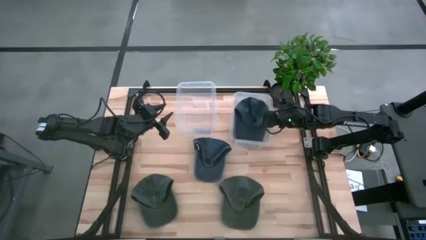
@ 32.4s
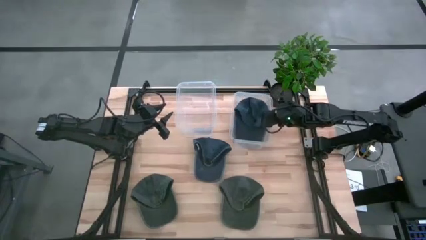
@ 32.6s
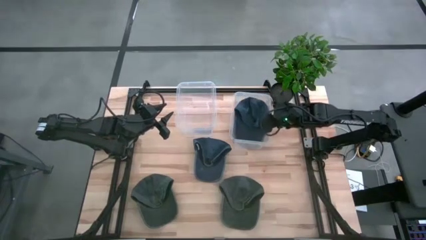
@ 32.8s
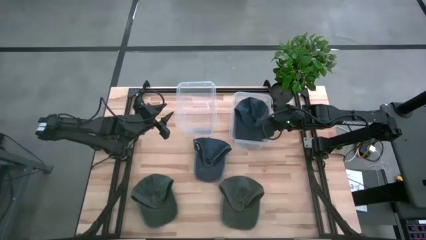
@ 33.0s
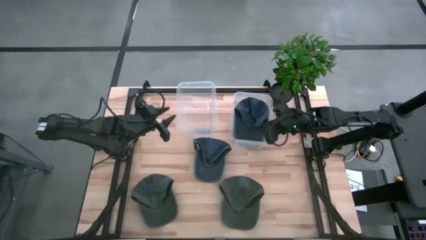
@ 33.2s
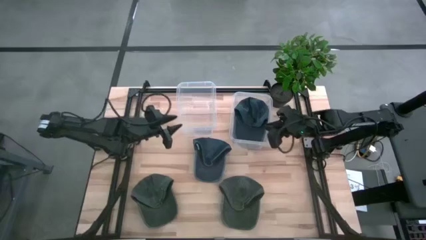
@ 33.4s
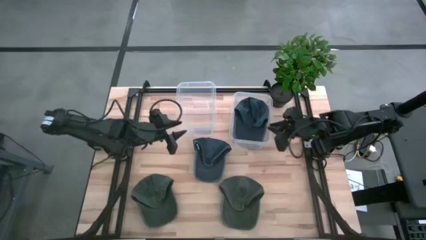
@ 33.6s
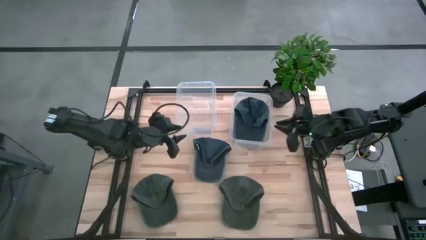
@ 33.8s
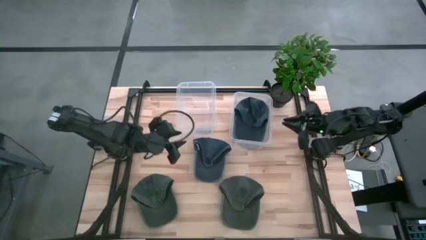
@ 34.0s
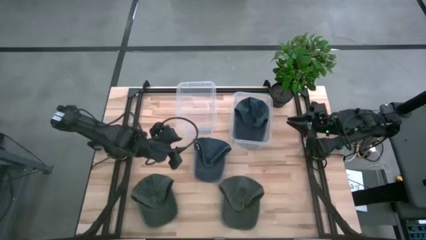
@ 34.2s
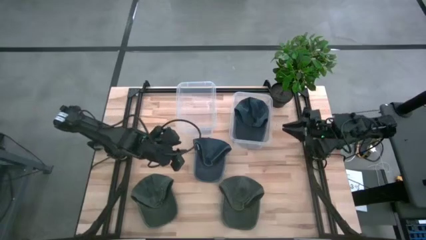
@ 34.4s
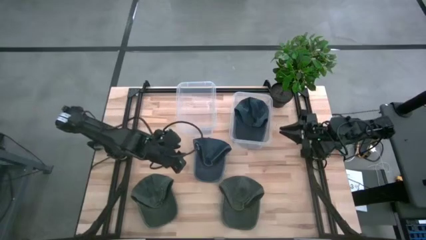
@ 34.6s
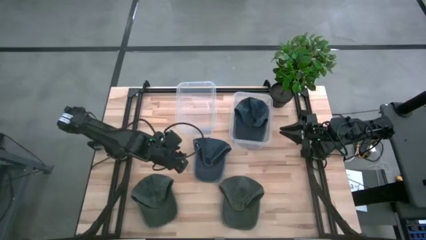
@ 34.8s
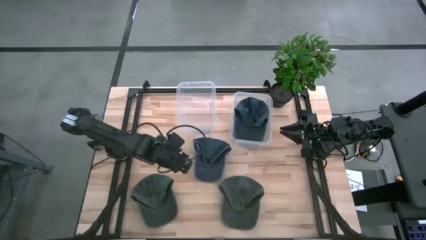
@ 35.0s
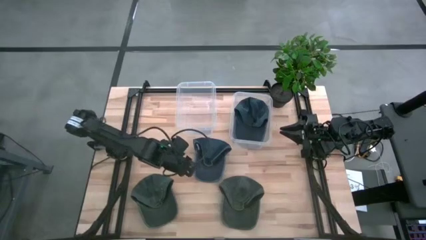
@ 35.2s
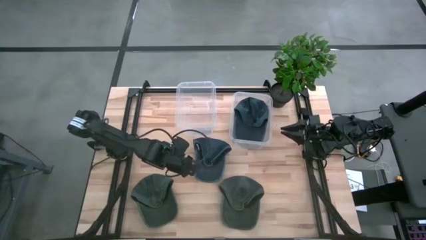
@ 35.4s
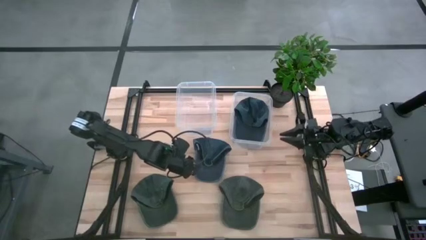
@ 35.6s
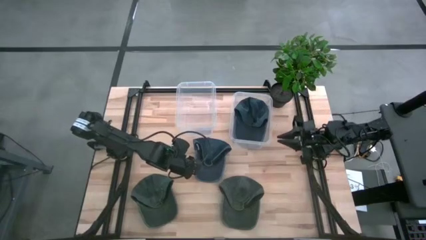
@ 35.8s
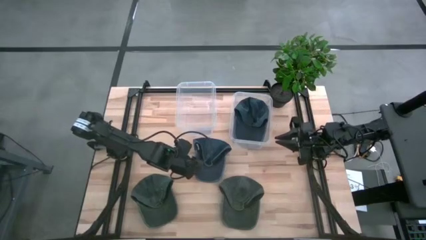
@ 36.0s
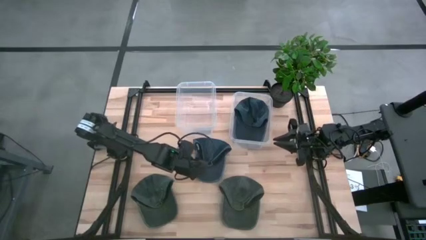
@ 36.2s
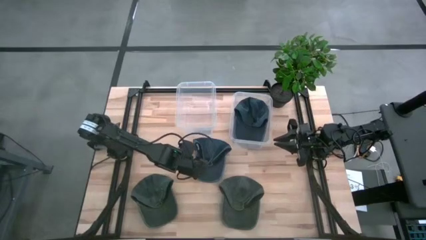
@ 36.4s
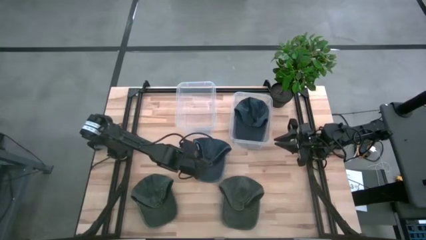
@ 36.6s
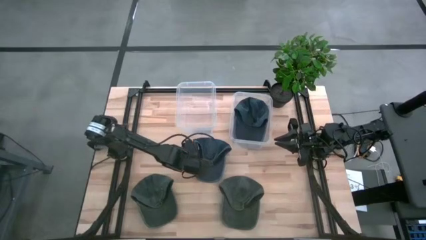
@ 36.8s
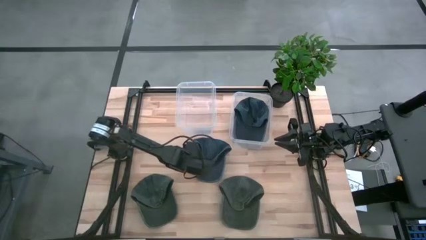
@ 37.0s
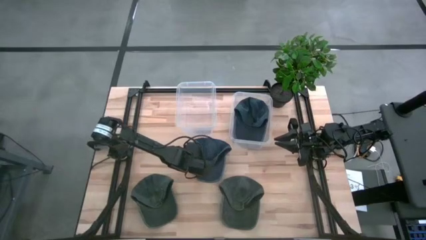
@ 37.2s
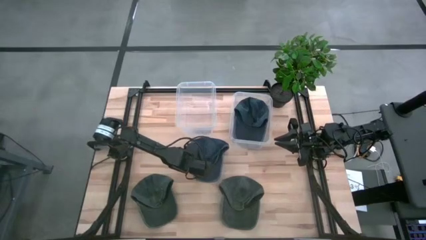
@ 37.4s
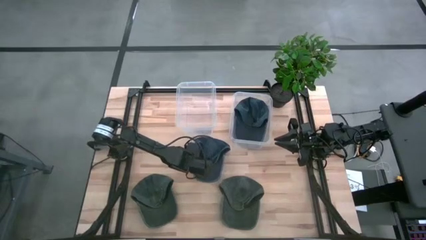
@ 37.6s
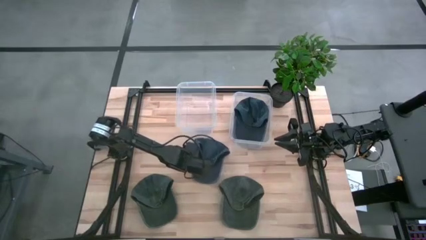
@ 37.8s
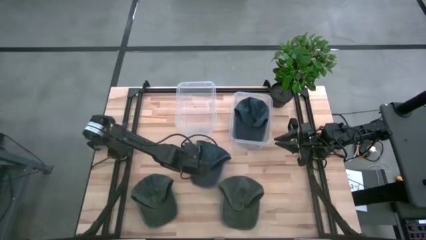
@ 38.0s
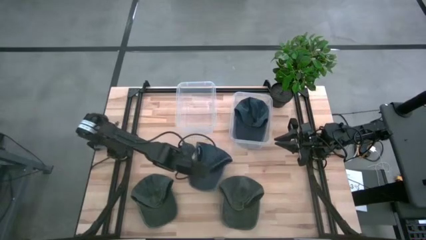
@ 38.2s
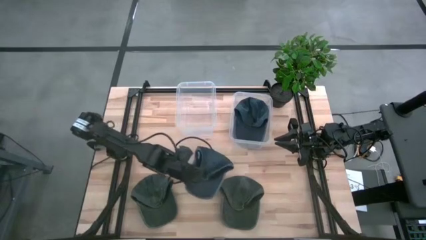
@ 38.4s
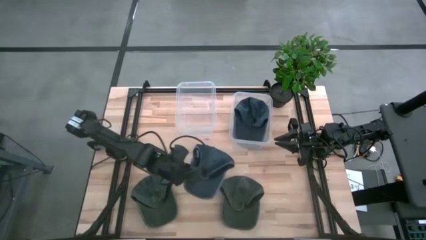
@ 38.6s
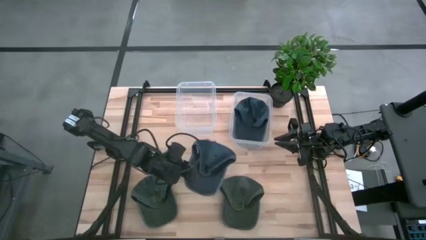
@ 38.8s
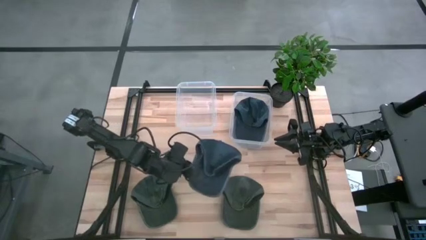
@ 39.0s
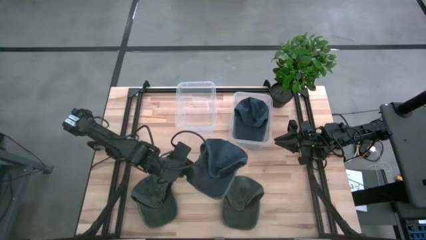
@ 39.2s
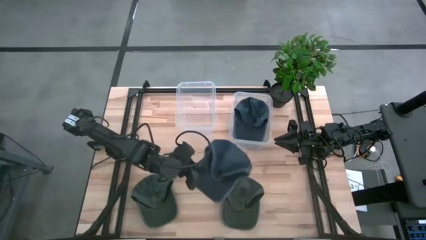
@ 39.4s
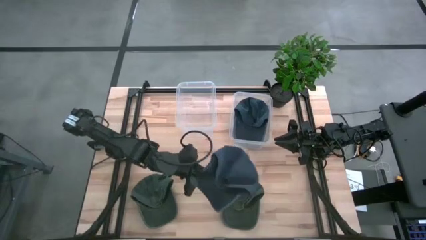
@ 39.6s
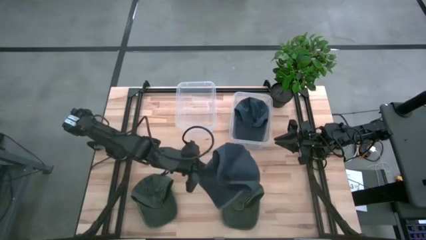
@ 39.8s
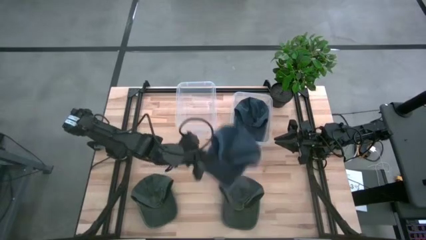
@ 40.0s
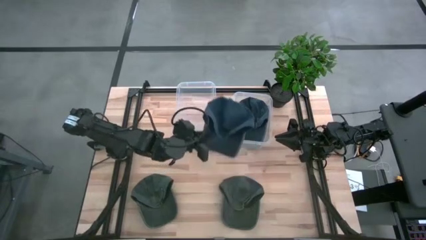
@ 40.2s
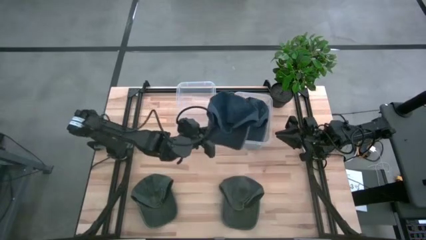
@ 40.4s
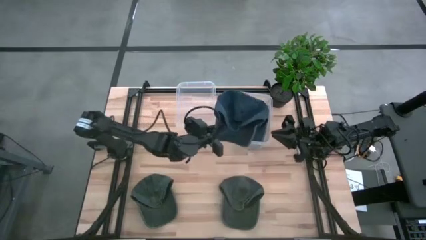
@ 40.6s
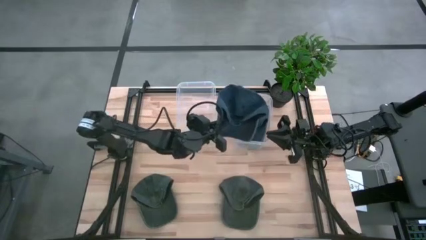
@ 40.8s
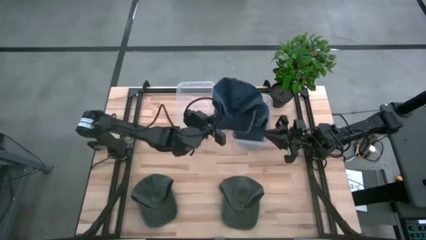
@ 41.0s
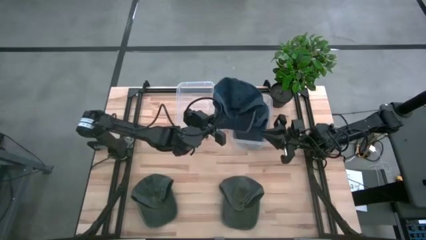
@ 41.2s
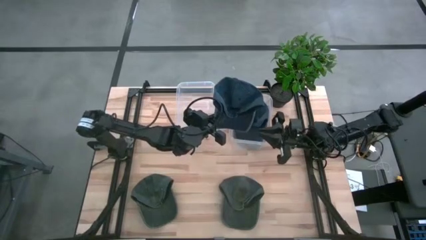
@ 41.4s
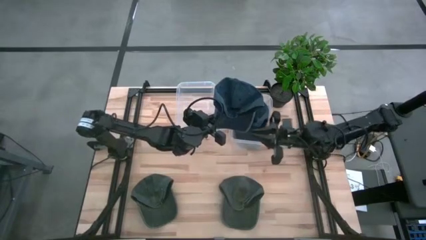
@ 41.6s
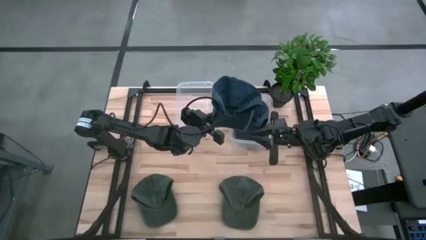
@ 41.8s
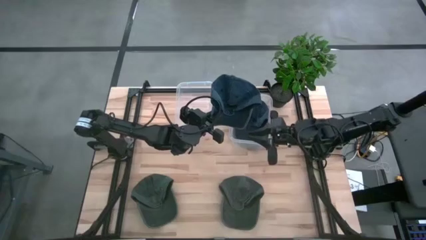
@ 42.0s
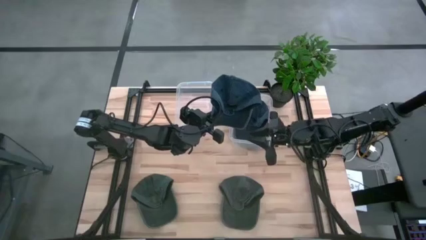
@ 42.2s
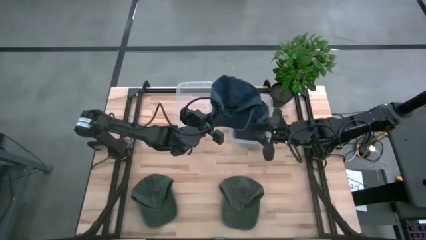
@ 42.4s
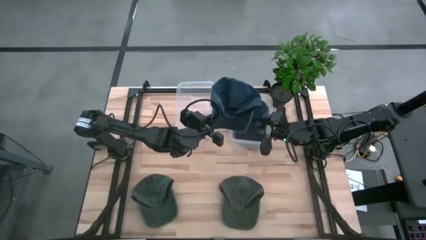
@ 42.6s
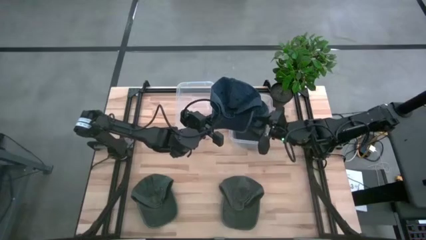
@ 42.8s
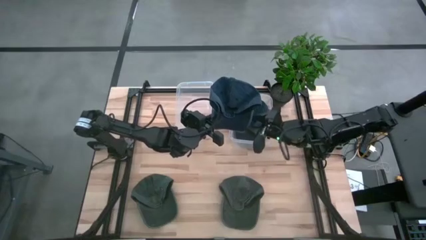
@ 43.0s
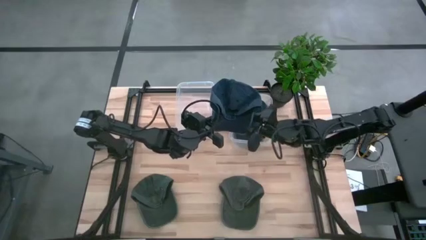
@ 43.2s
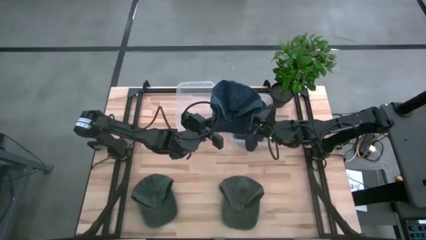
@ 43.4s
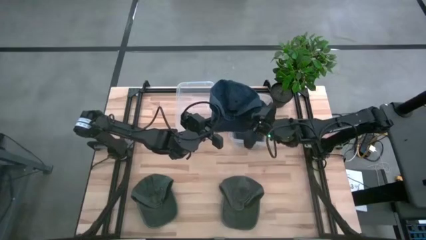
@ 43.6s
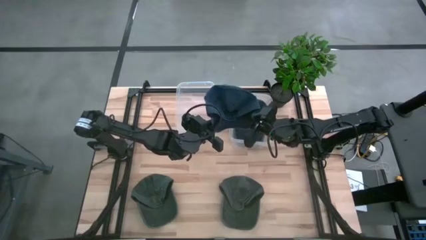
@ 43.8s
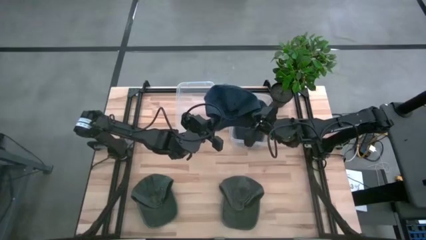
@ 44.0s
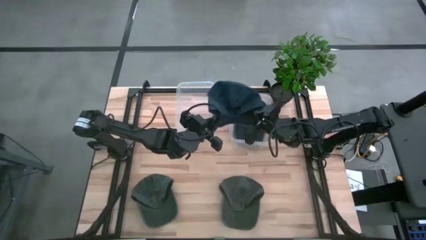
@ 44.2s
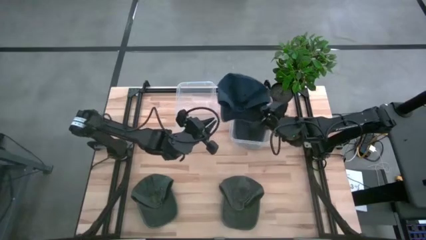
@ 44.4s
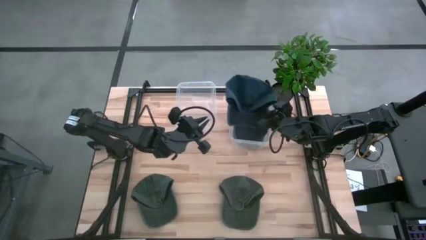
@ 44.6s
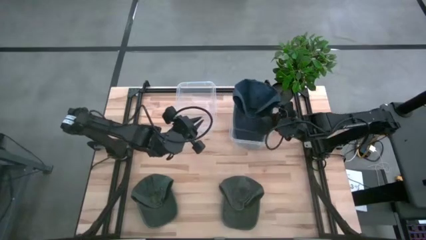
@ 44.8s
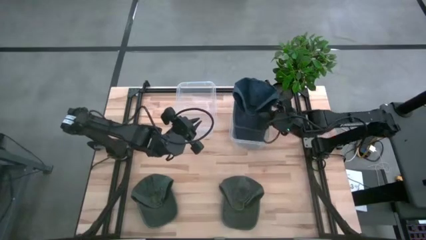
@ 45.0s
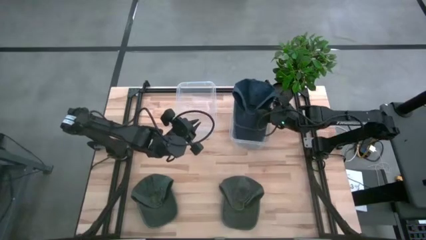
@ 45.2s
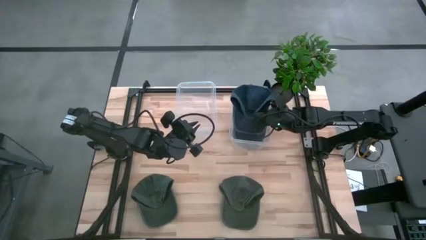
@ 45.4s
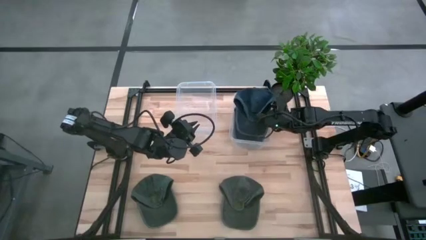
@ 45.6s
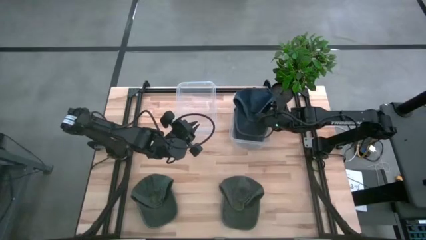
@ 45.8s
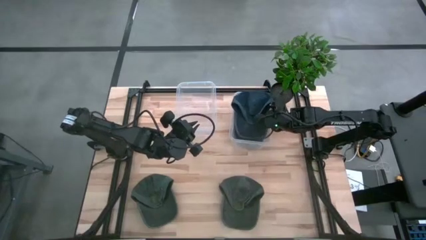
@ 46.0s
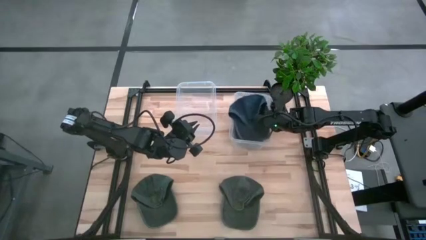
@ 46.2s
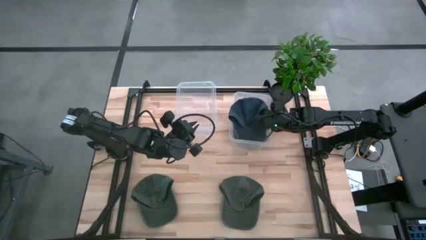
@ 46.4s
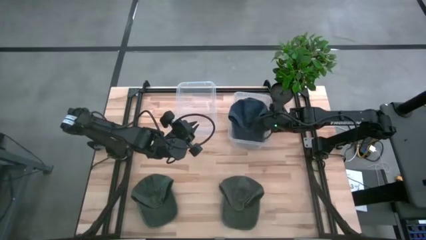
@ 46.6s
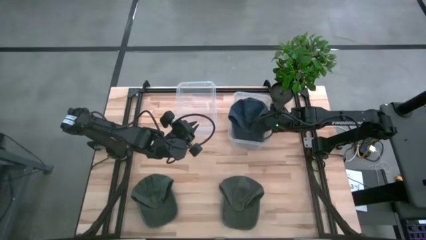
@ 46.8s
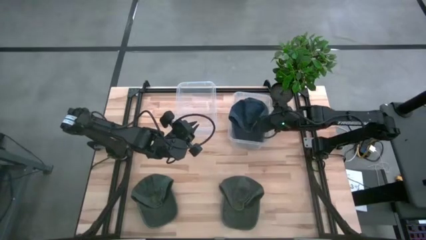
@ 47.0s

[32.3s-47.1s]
Task: Pick & Place hat
Put the blue cap into the right transparent bin
